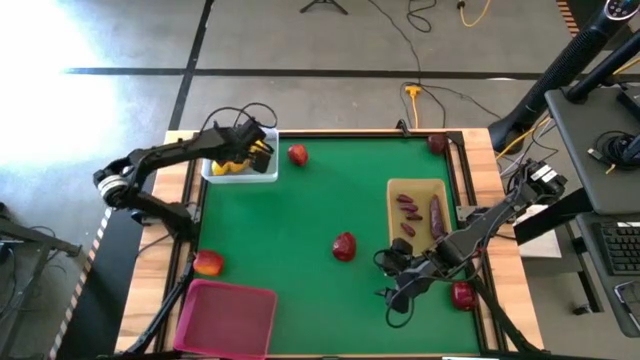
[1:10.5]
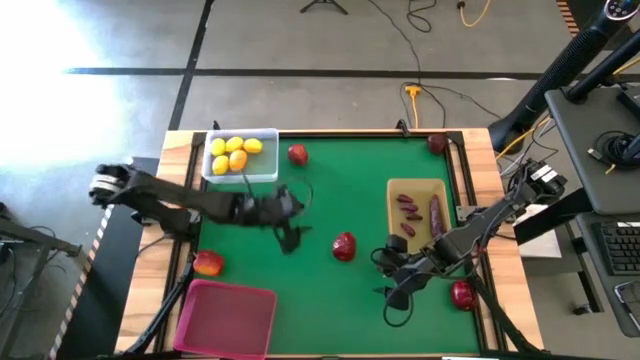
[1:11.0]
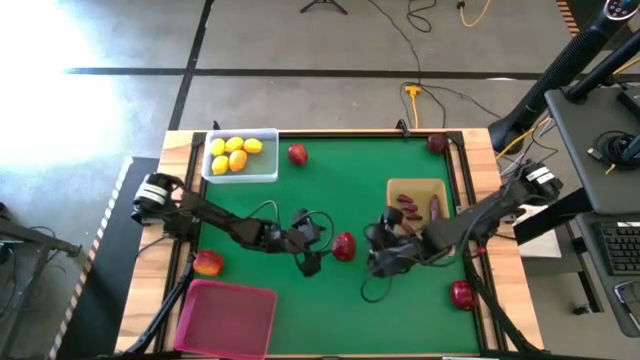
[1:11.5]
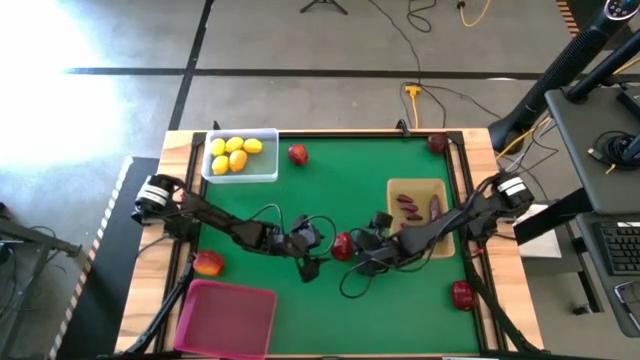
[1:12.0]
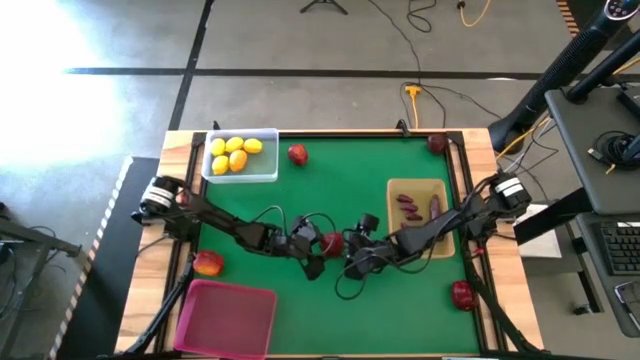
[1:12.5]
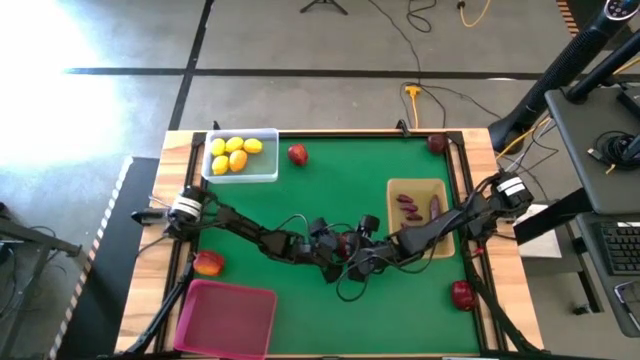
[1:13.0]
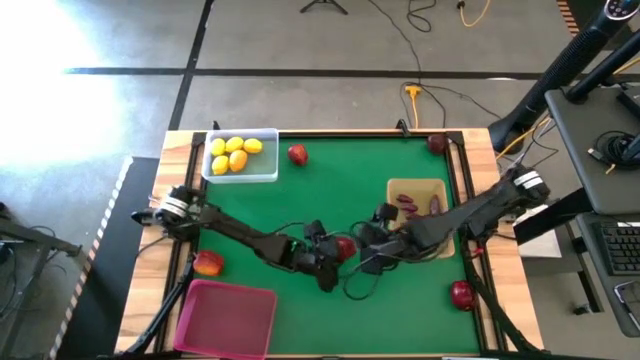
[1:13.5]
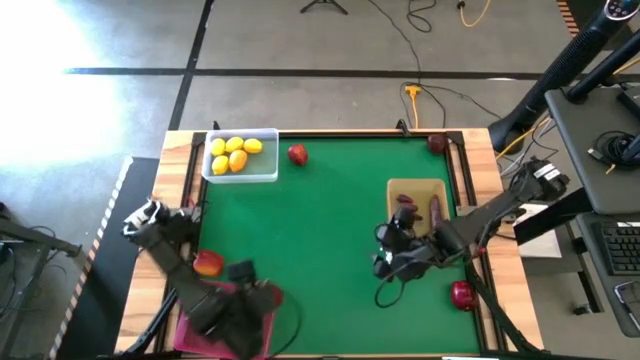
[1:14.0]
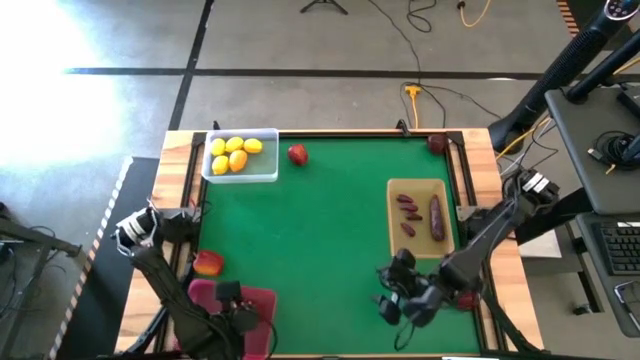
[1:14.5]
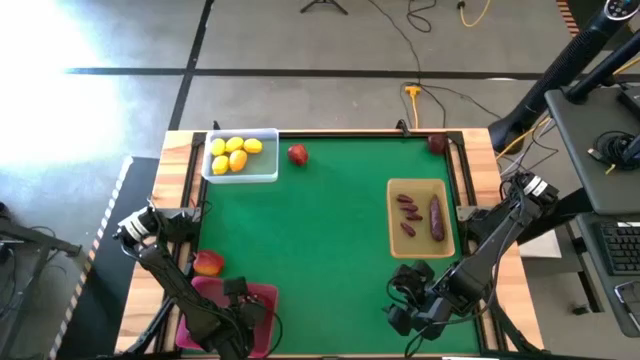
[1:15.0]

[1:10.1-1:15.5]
Task: Sort produce into baskets
Put the apple into the pink transparent bin

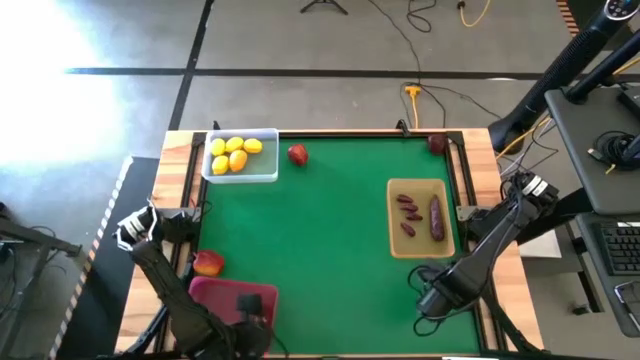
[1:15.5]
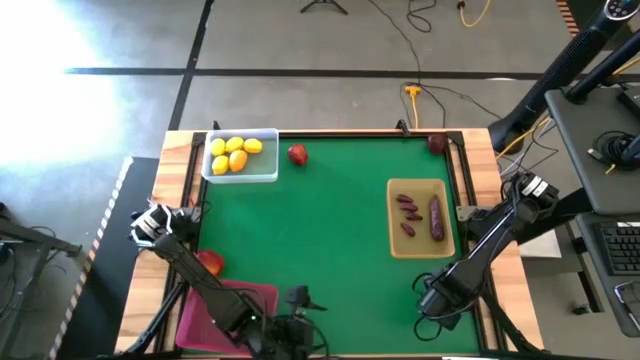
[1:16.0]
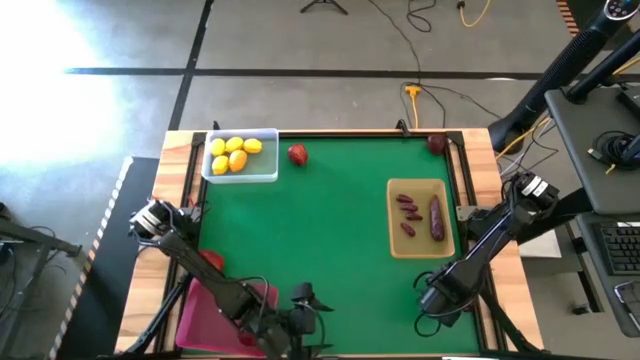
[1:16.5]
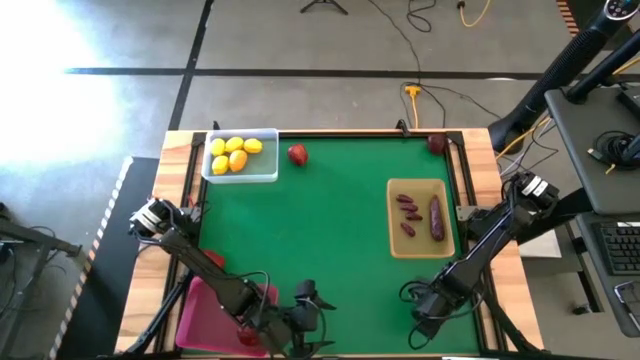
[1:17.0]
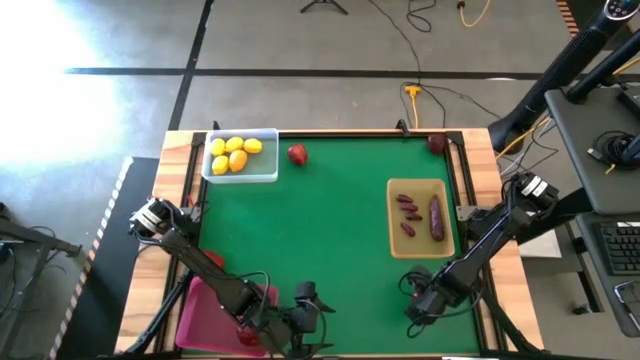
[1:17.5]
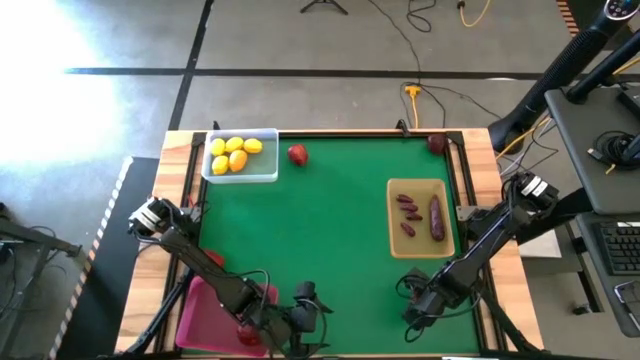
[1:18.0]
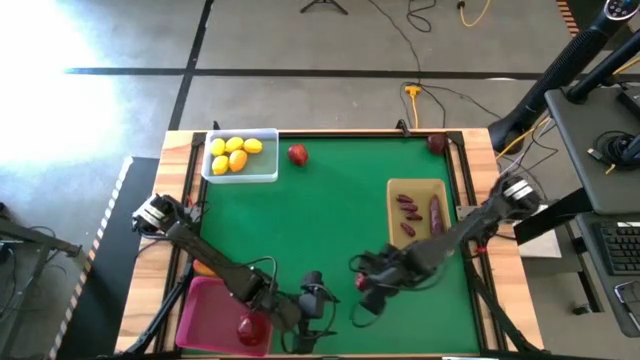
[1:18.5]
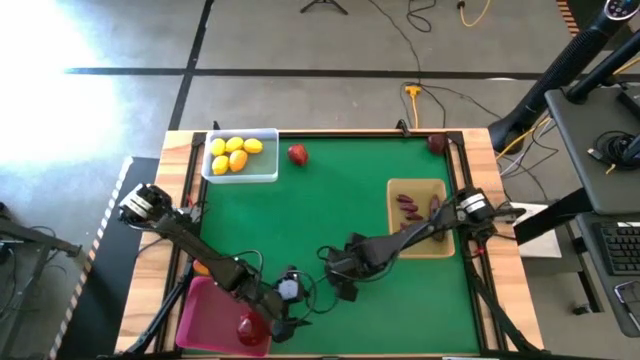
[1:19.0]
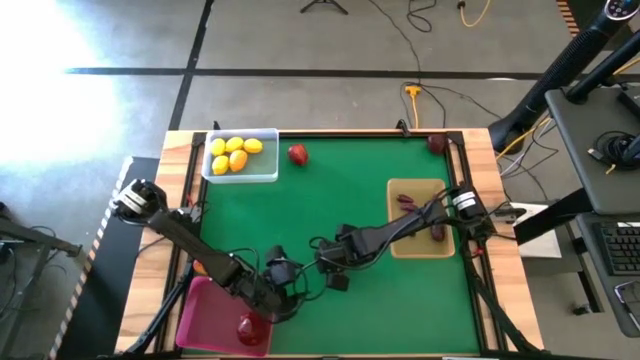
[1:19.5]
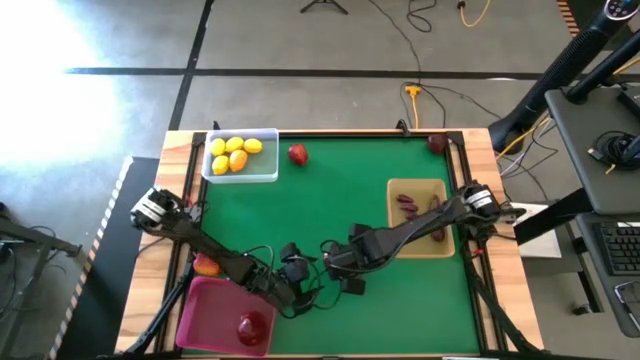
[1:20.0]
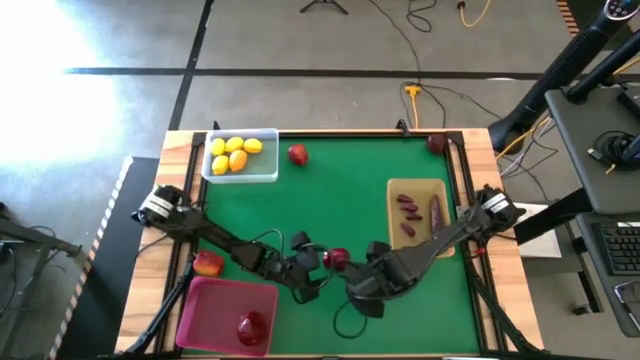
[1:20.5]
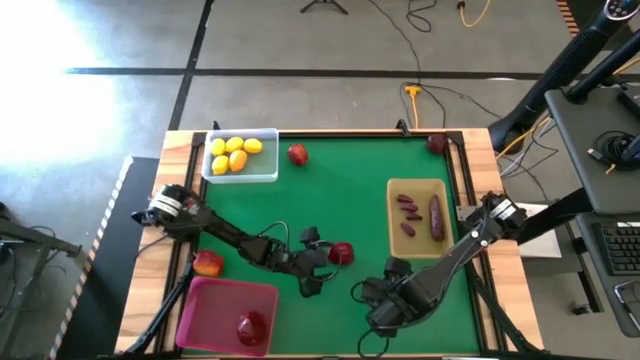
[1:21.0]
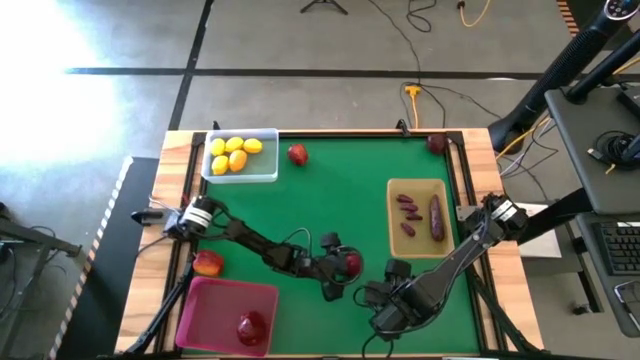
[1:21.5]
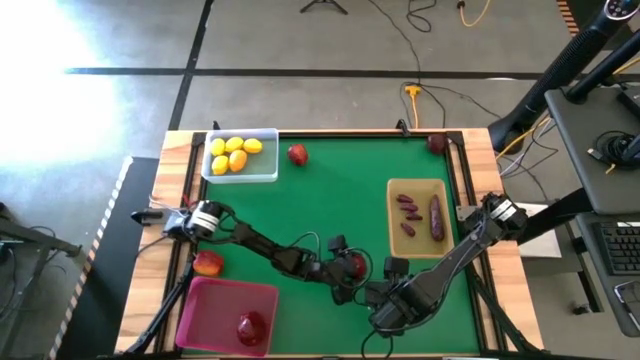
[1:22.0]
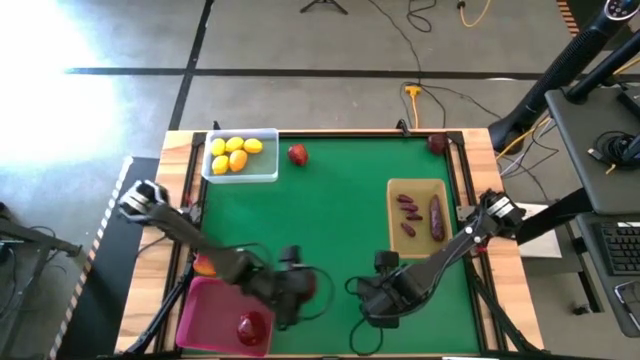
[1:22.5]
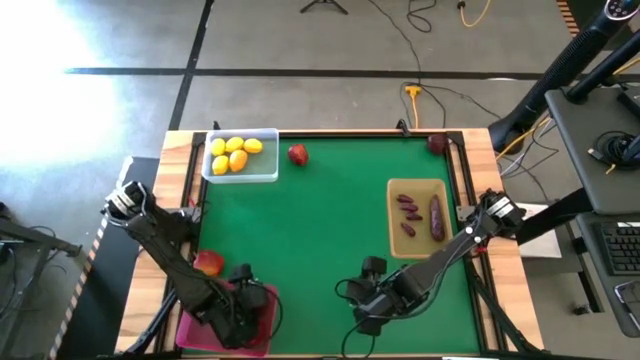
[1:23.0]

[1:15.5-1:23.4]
Put the apple into the pink transparent bin

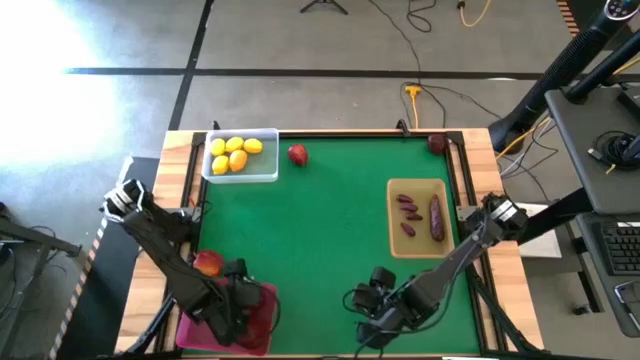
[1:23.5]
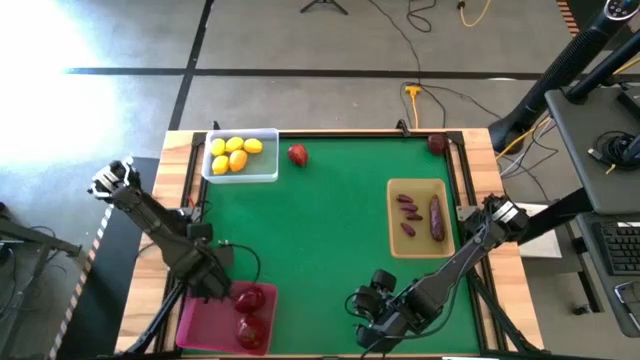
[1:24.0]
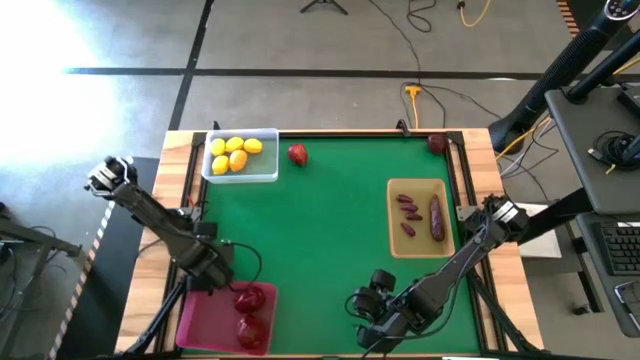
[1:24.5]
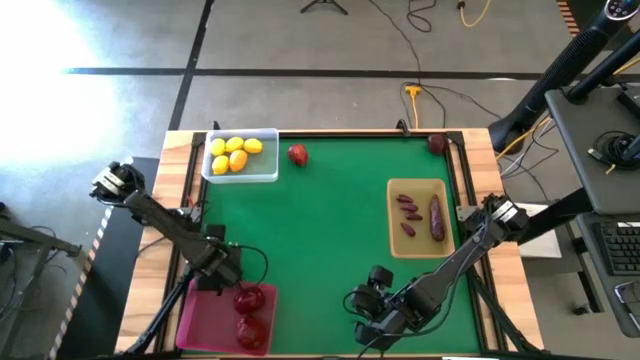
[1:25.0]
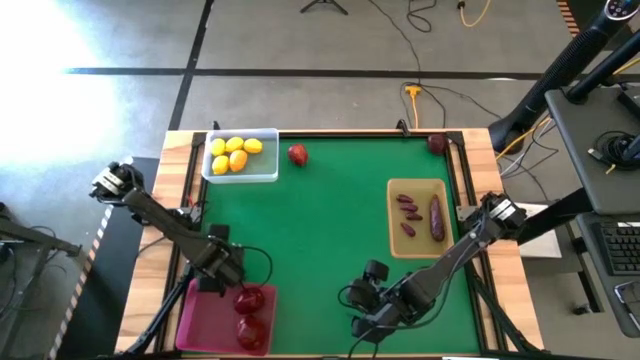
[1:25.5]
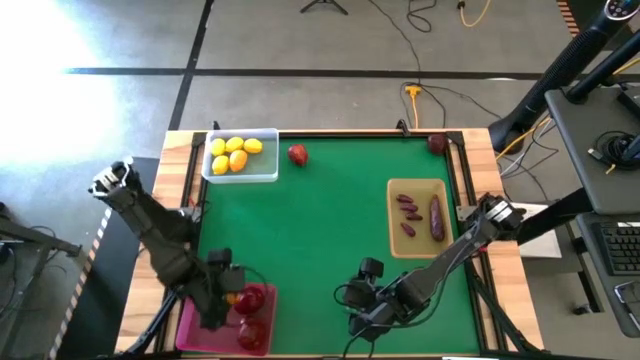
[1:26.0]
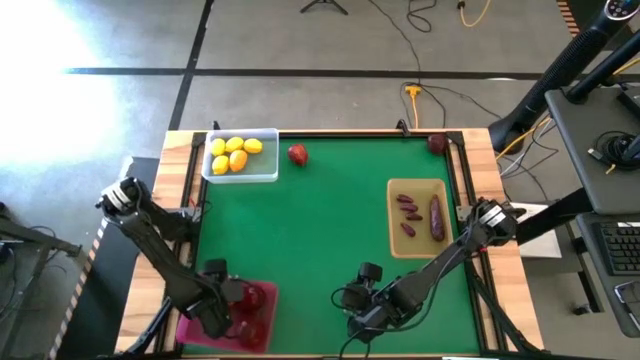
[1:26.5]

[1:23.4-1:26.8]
Put the apple into the pink transparent bin

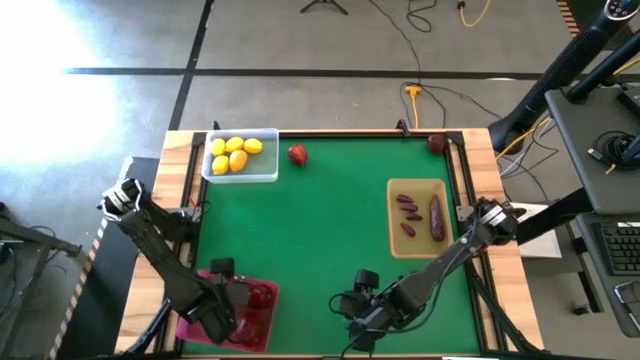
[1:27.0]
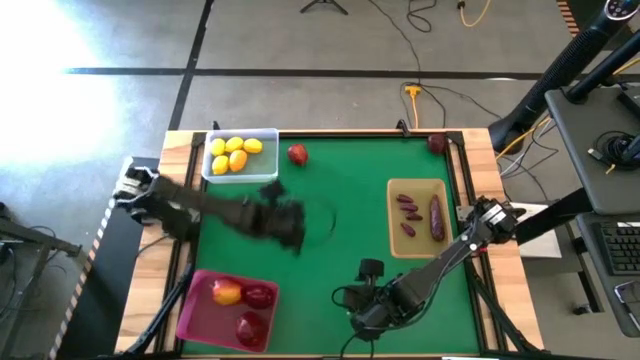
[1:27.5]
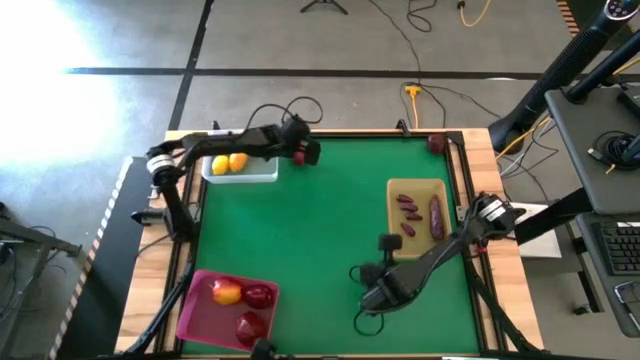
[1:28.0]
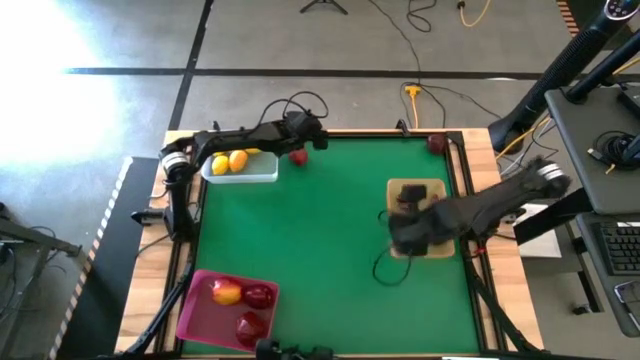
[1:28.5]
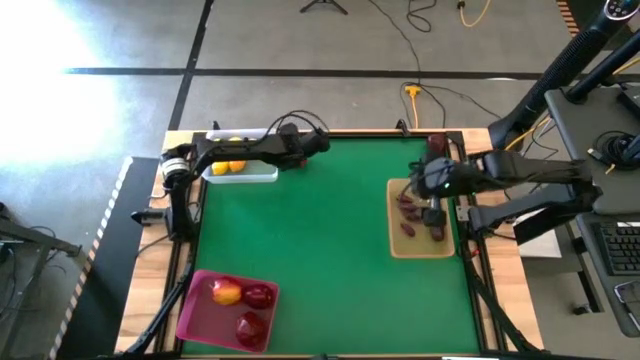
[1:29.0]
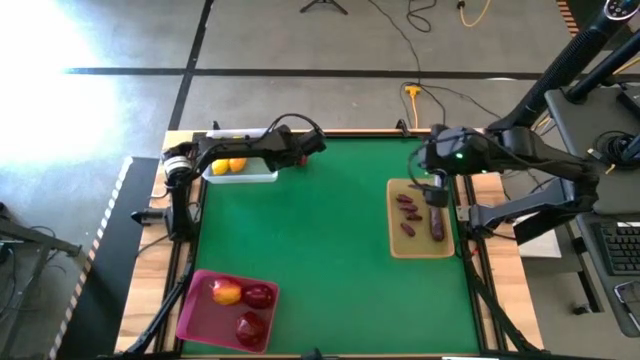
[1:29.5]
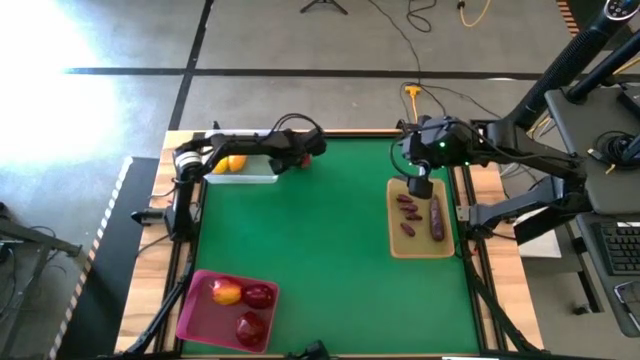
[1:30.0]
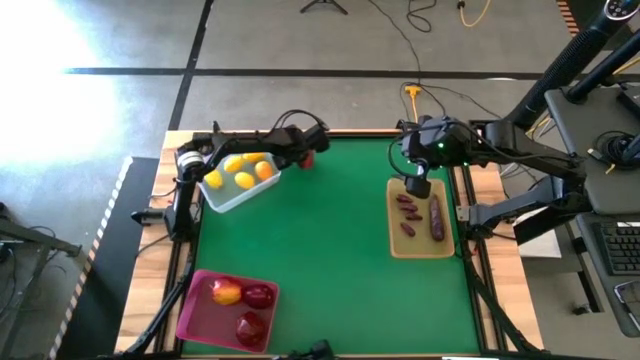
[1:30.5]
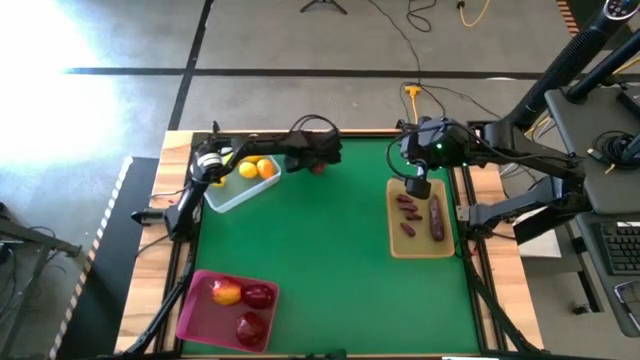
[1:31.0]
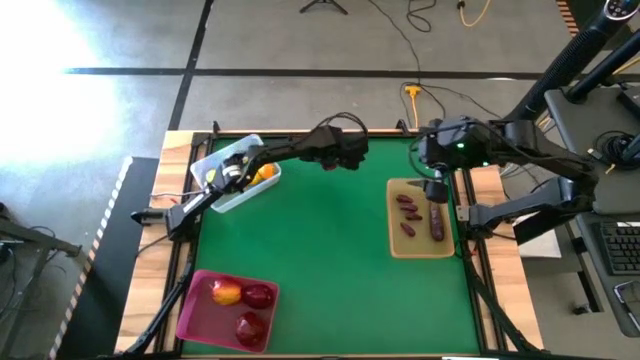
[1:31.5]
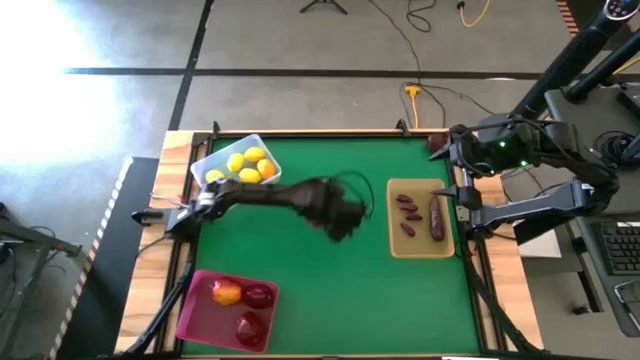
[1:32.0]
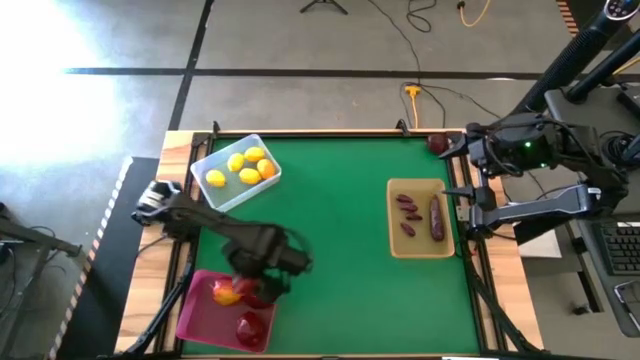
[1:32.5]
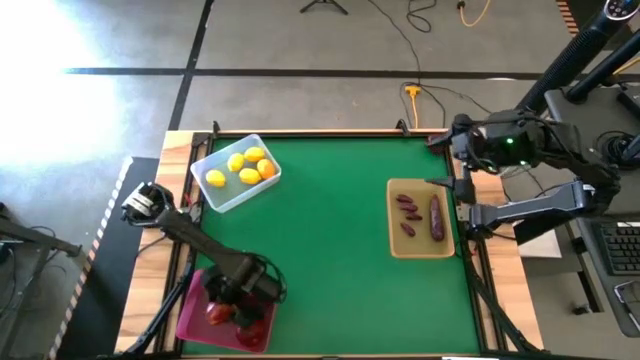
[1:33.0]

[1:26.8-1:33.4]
Put the apple into the pink transparent bin
